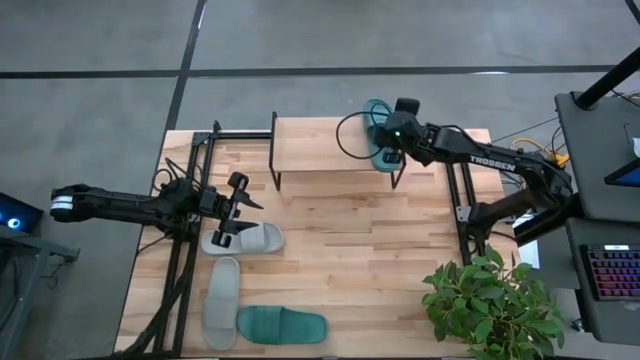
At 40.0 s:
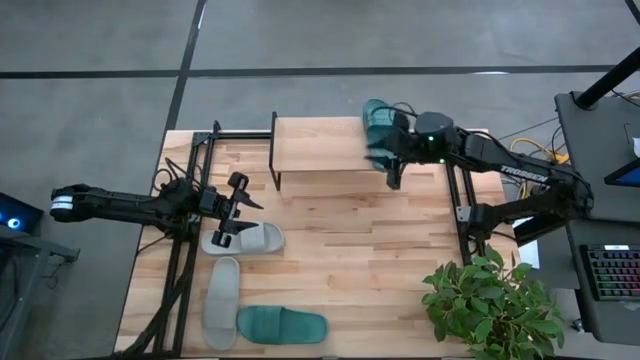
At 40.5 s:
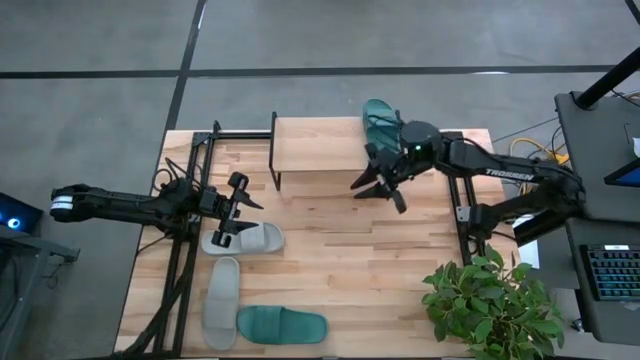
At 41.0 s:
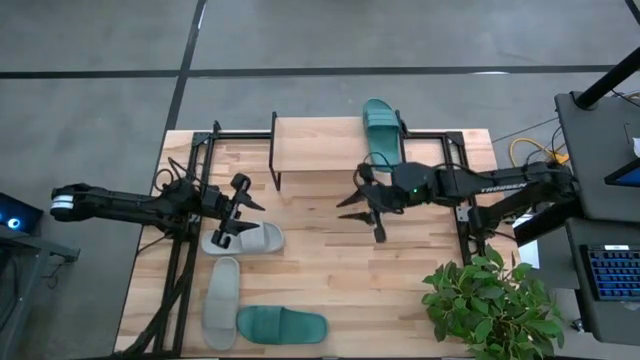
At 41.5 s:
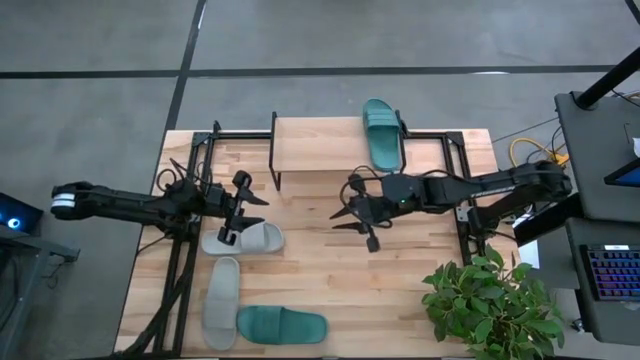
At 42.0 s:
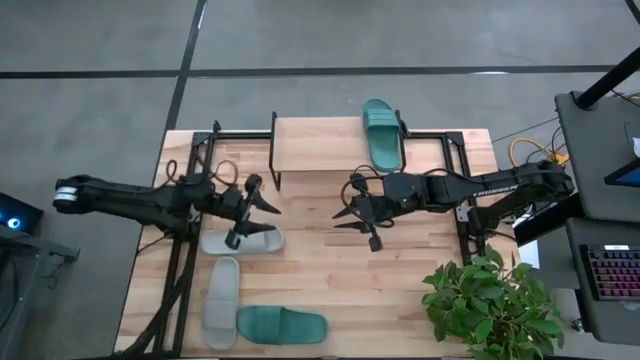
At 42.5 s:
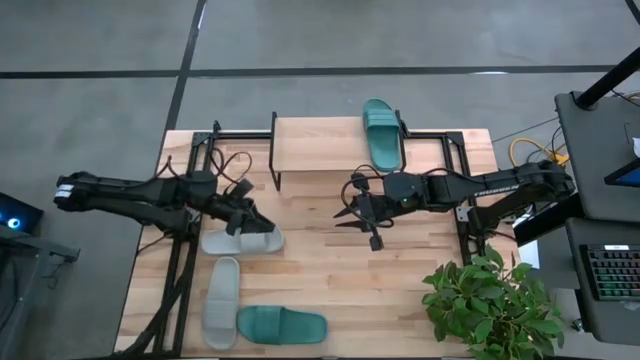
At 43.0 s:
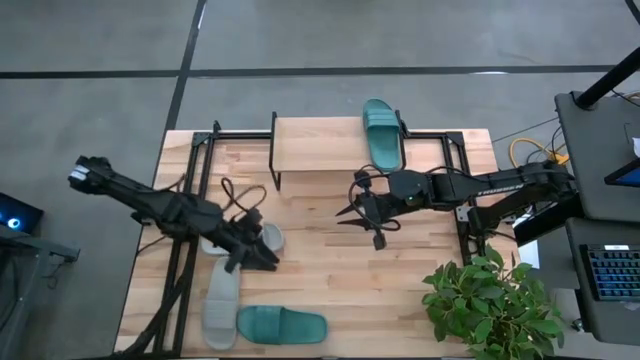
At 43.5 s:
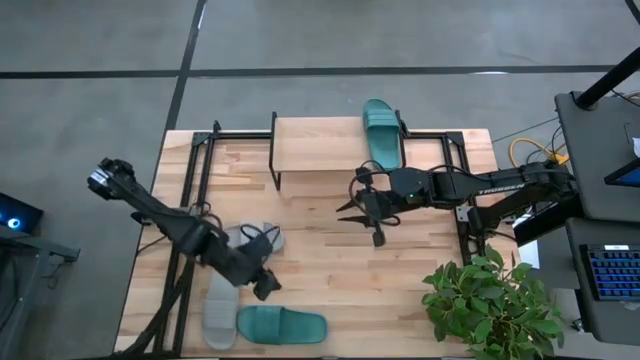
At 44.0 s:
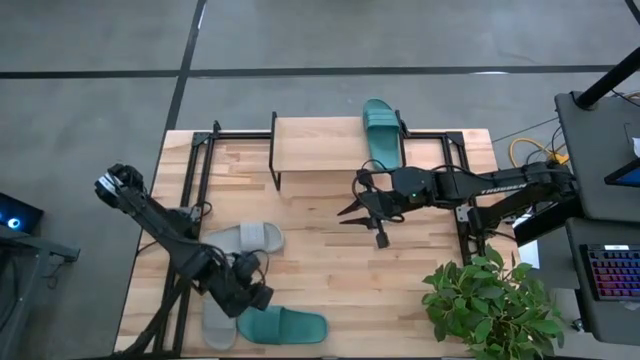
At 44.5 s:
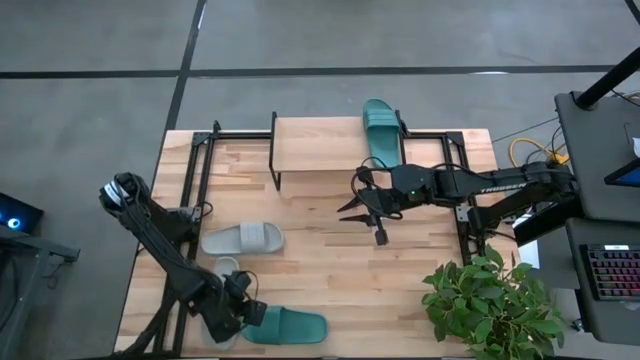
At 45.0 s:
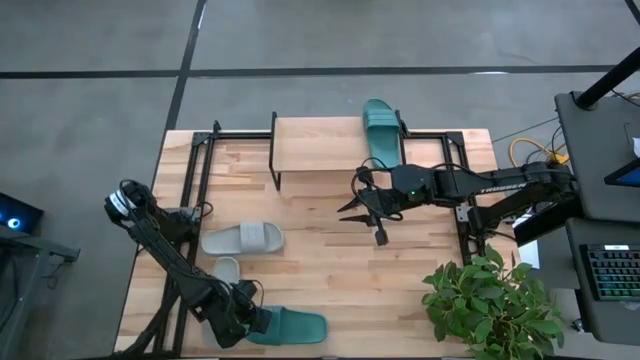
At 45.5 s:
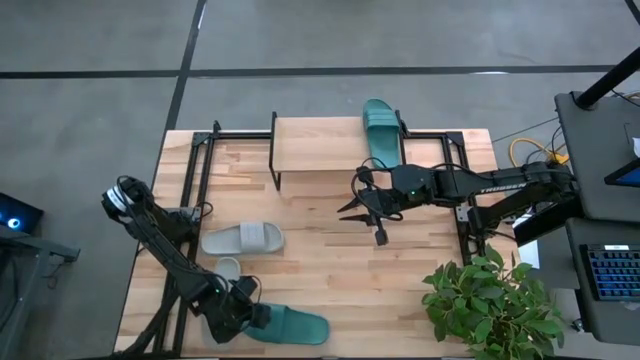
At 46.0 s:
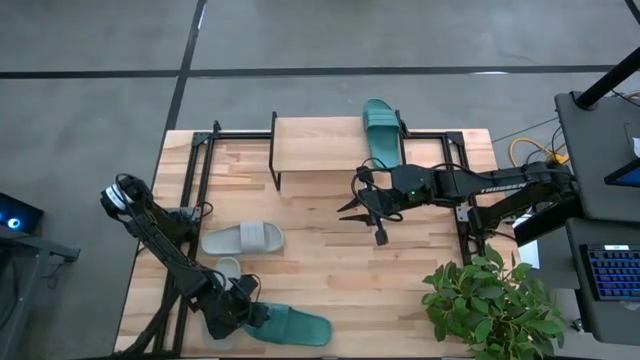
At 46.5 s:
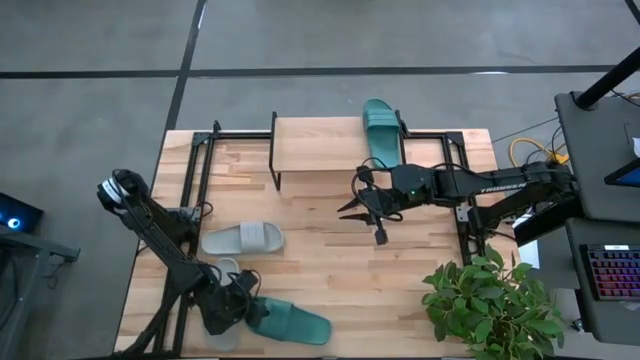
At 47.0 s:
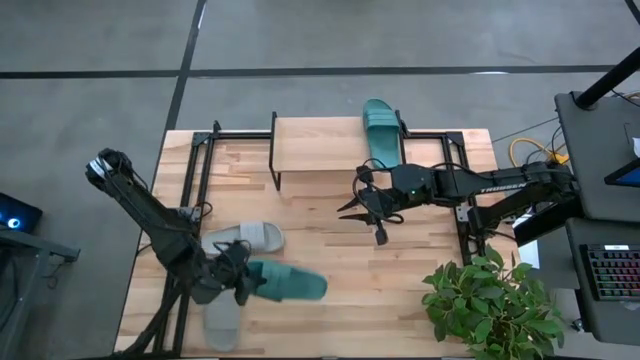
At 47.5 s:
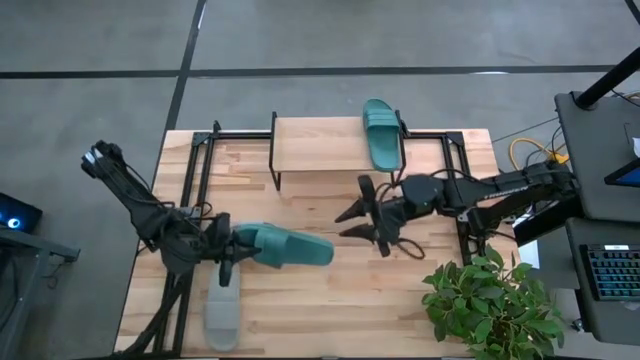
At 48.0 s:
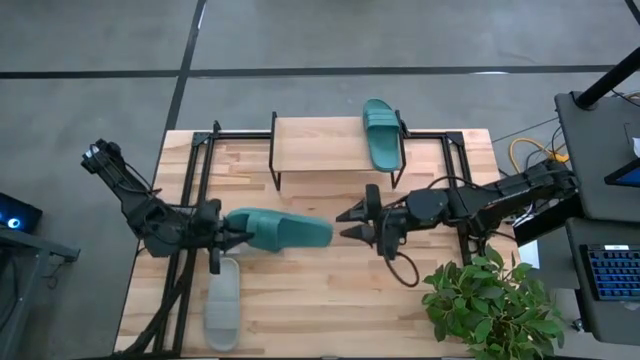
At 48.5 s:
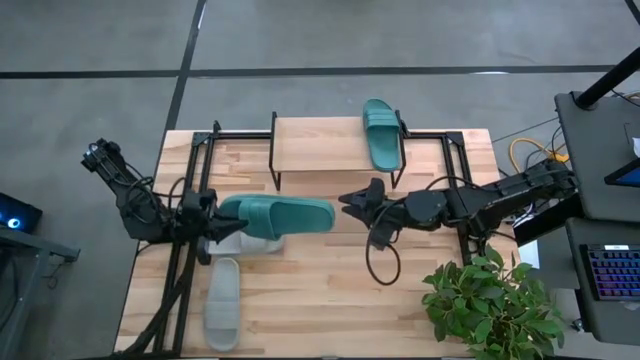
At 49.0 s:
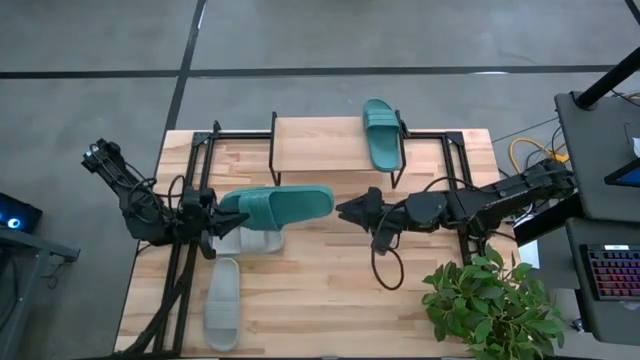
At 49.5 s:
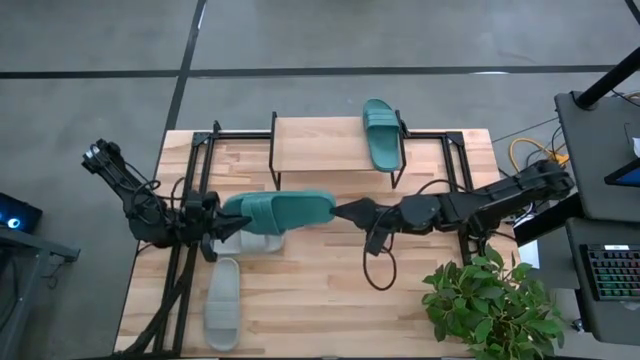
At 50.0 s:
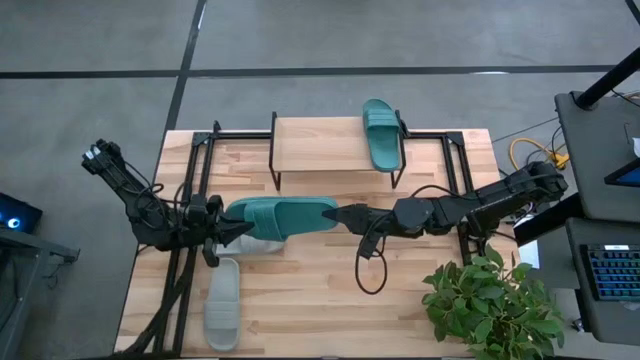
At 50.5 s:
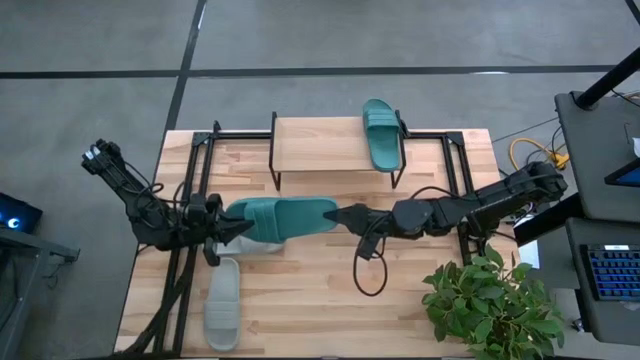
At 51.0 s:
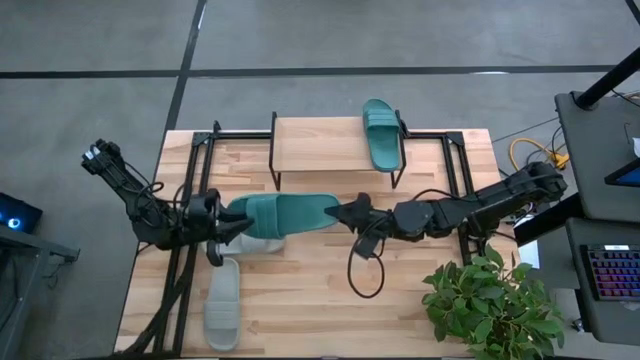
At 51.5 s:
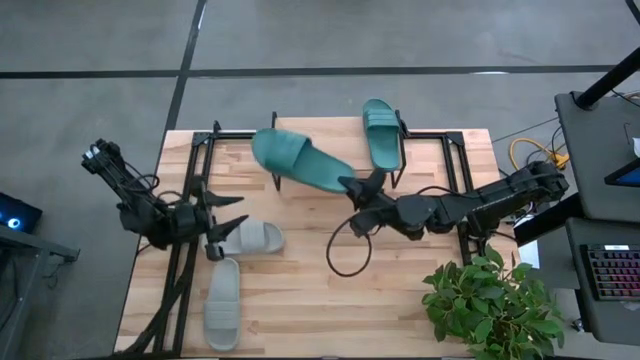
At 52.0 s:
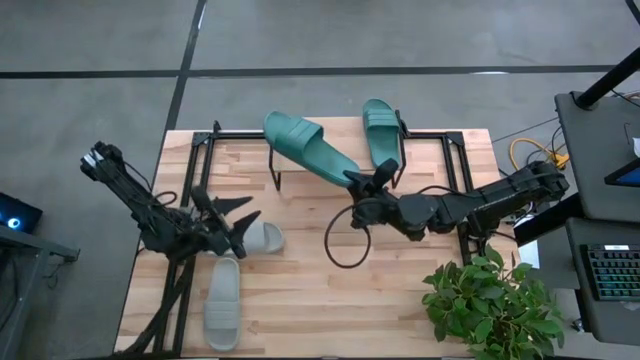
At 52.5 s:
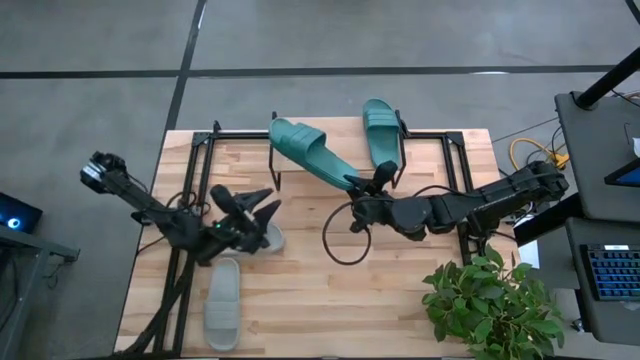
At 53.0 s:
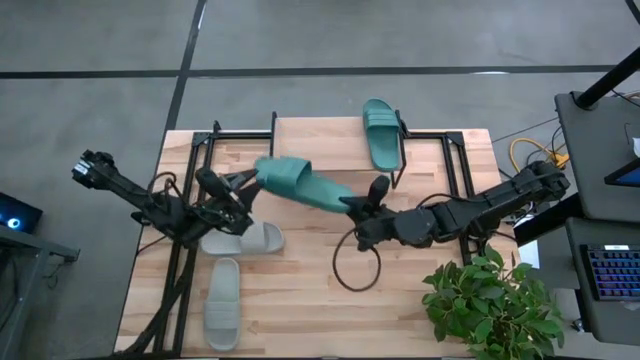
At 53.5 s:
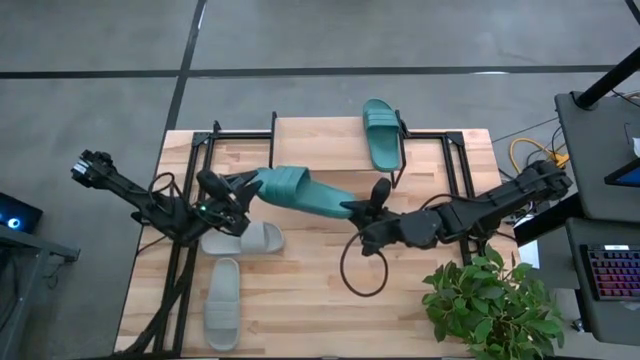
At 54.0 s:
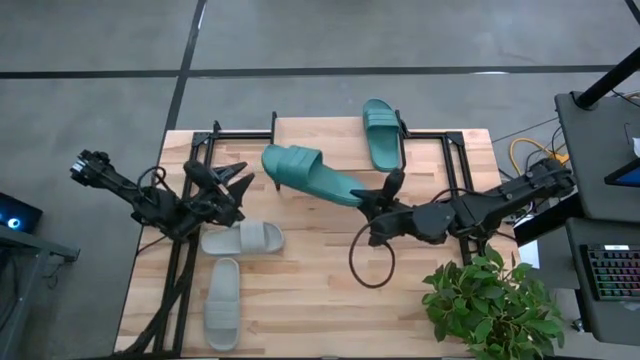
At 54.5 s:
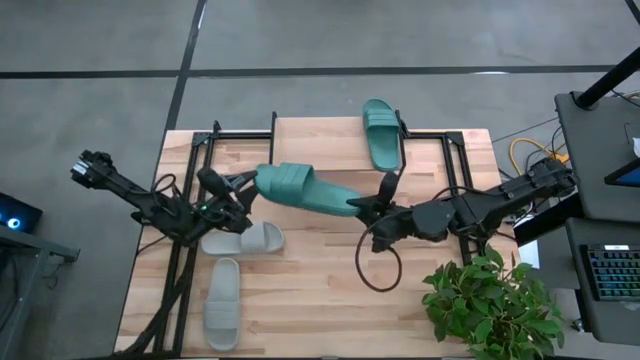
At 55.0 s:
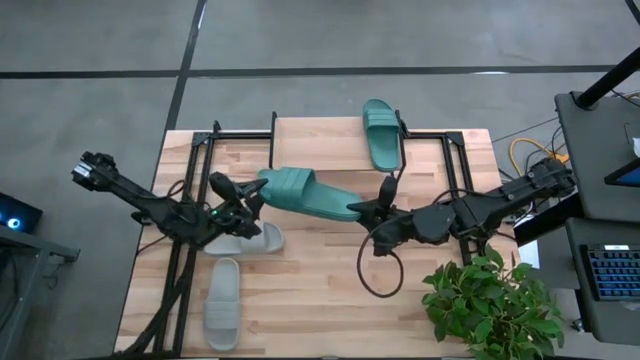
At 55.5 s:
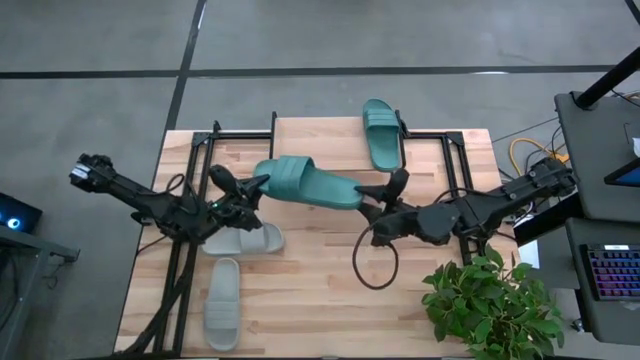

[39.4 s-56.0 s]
Task: Pick and place slides into the shelf
Put the green slide on the shelf

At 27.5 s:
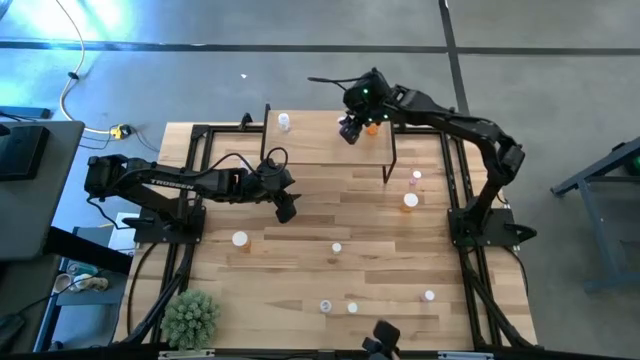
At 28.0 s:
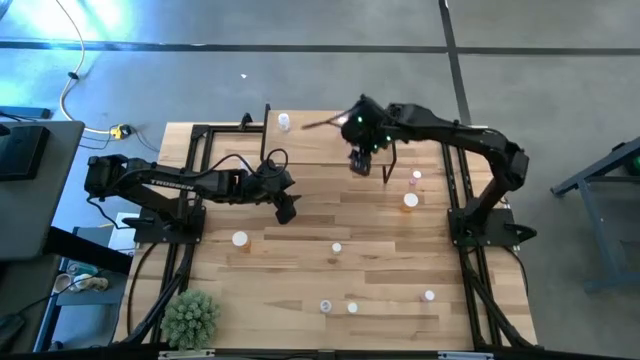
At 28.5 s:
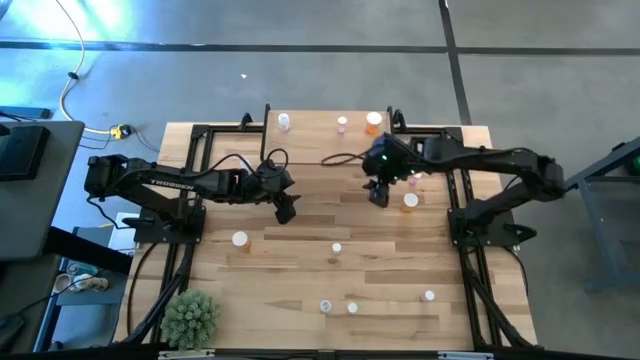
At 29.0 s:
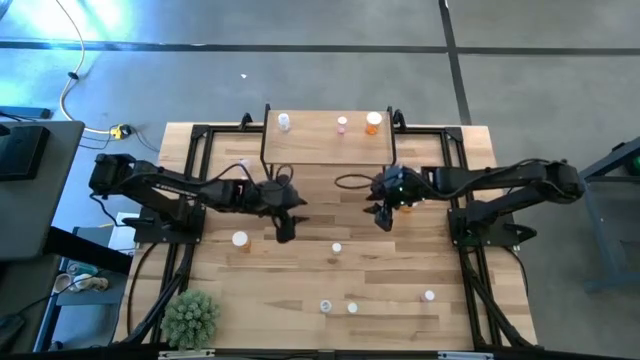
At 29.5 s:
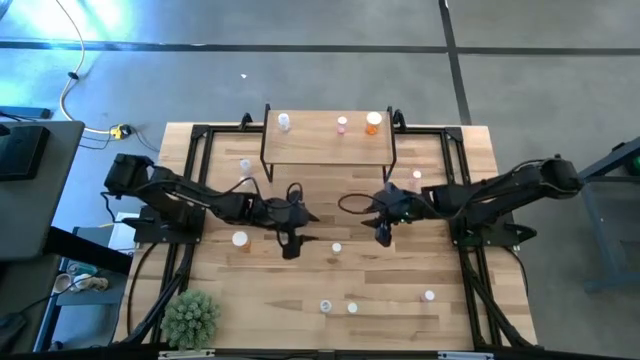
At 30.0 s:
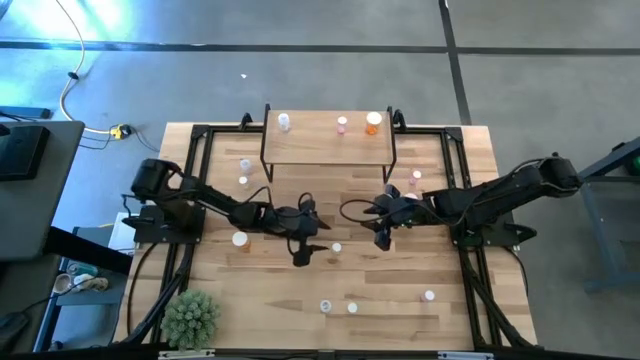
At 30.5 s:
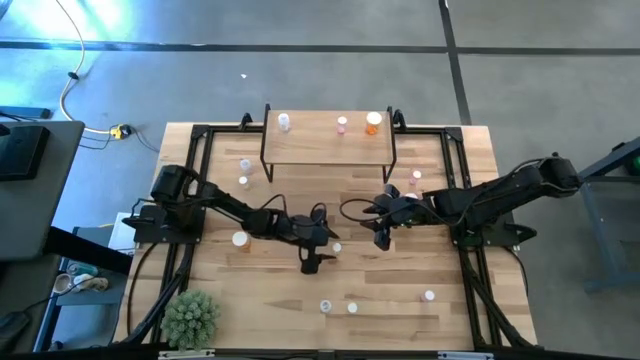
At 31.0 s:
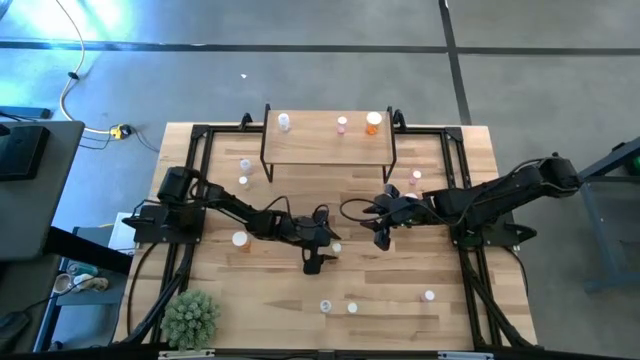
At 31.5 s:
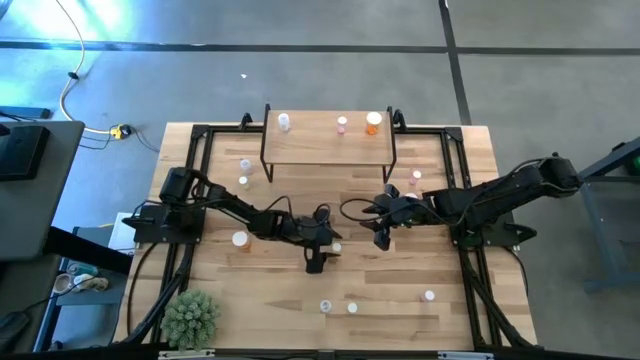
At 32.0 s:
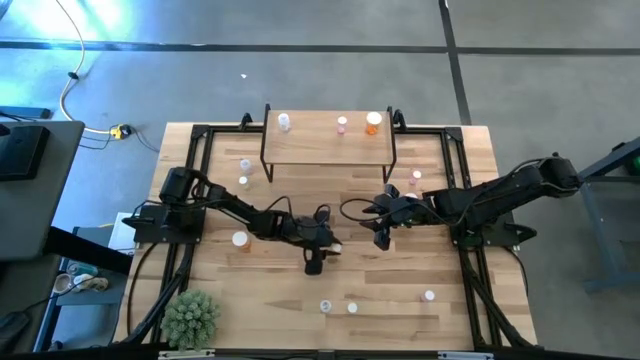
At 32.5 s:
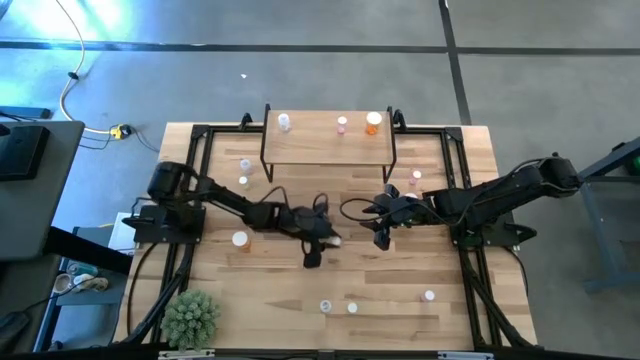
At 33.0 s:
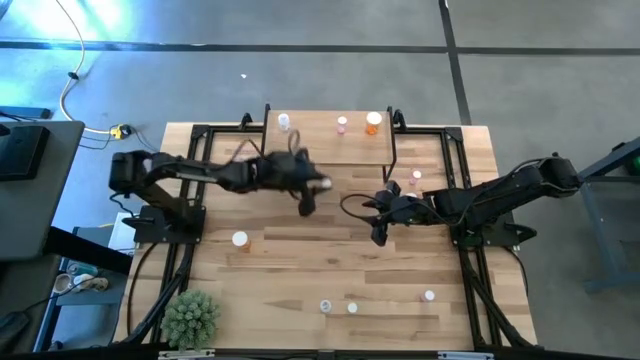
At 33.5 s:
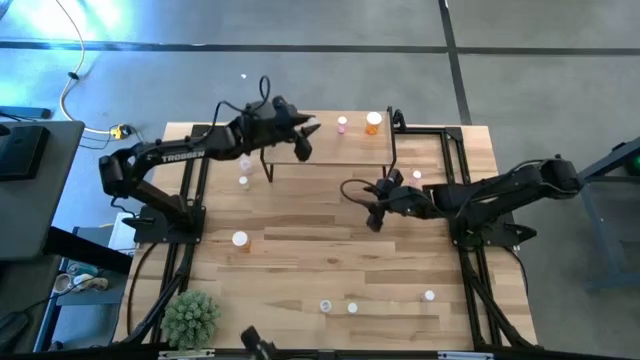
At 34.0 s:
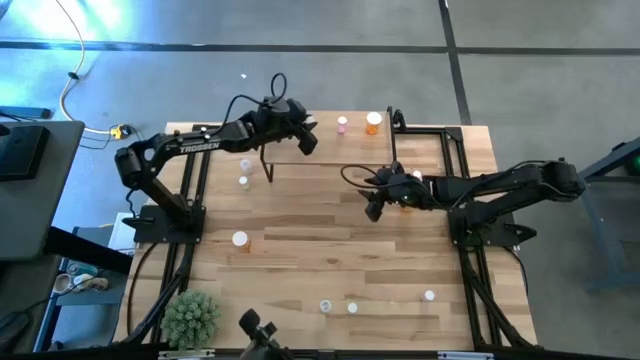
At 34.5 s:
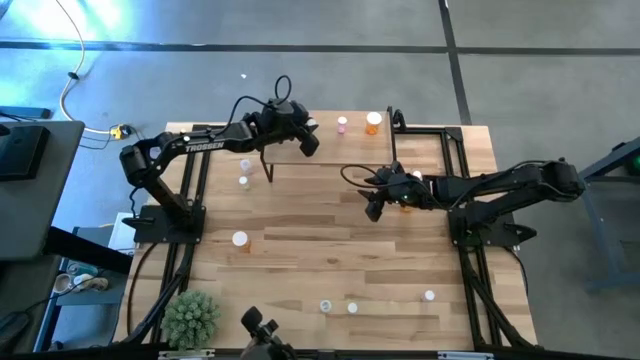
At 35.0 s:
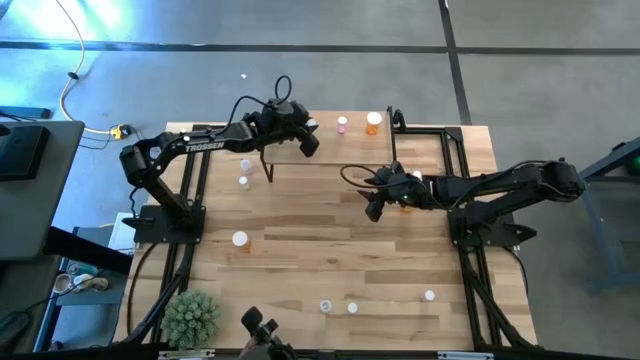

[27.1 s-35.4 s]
Task: Pick and place medicine bottles onto shelf by color
Put the middle right yellow pill bottle on the shelf
